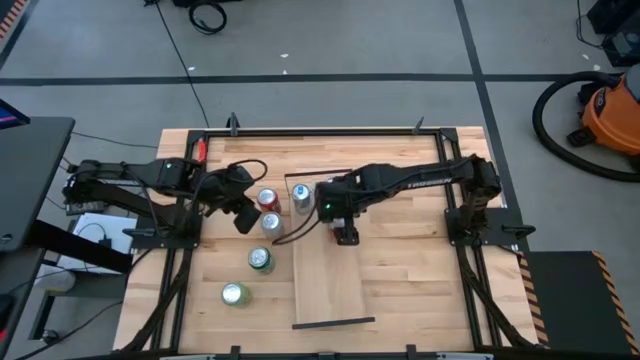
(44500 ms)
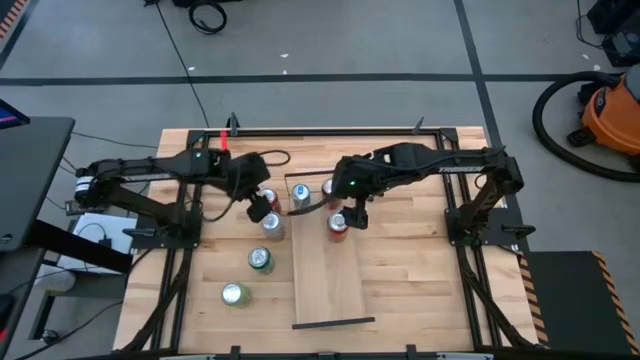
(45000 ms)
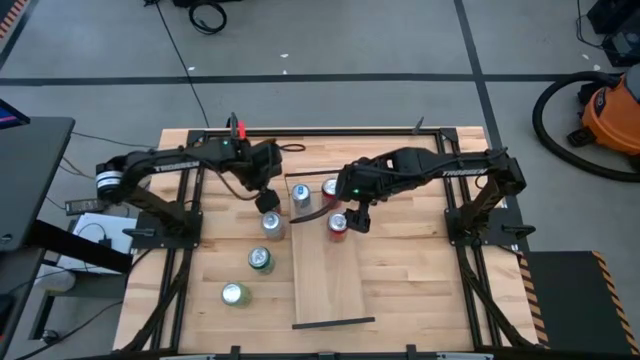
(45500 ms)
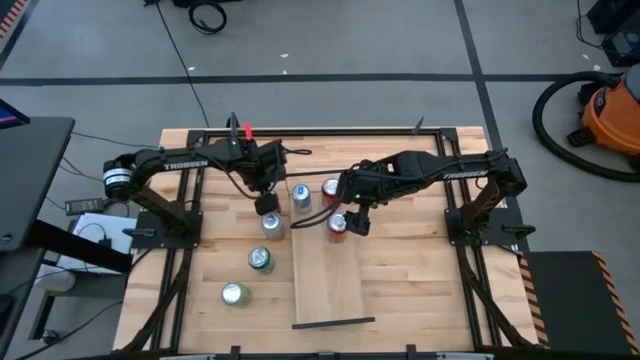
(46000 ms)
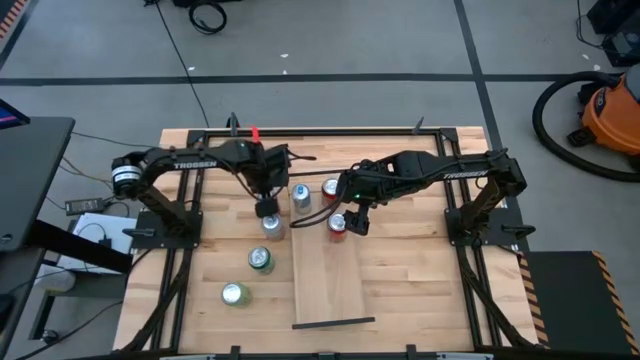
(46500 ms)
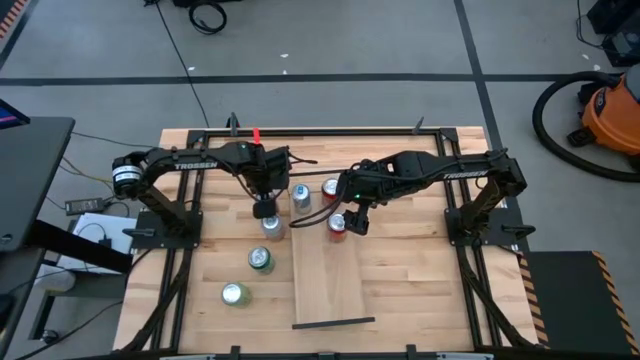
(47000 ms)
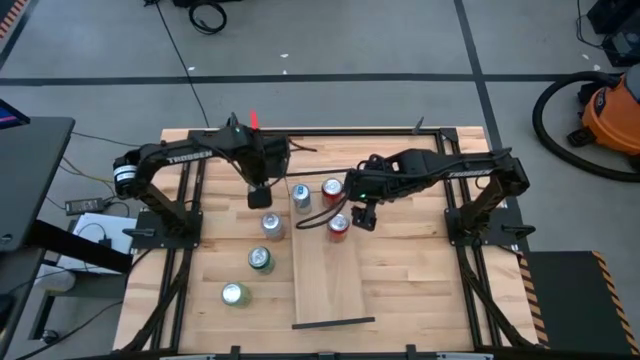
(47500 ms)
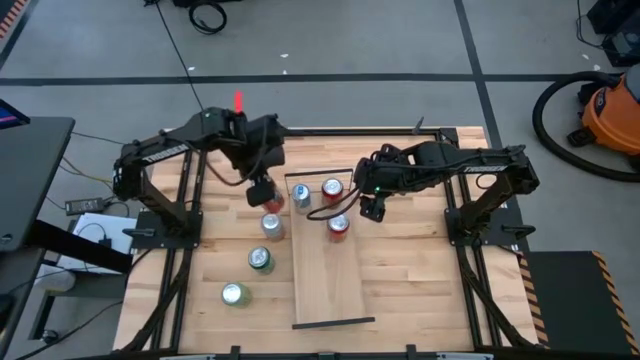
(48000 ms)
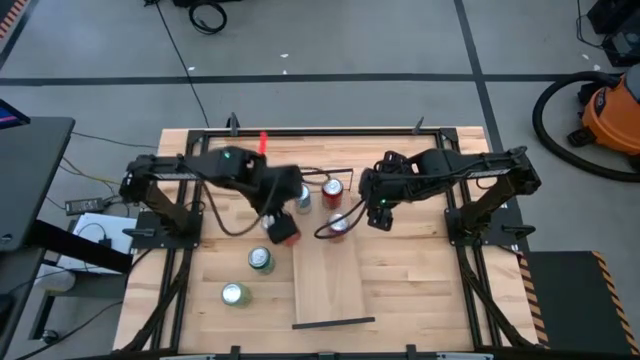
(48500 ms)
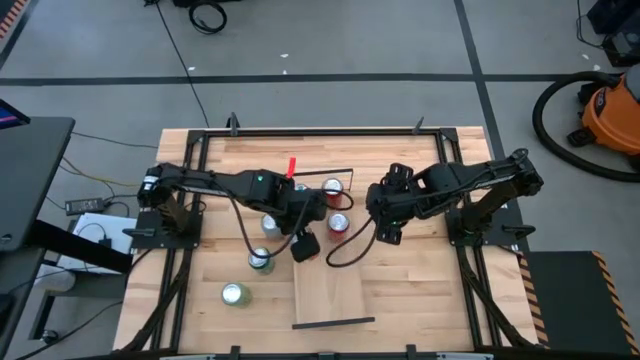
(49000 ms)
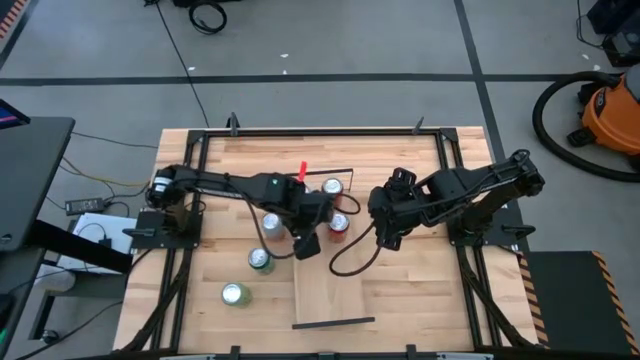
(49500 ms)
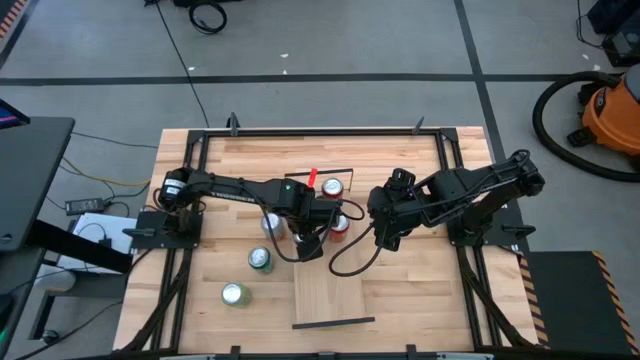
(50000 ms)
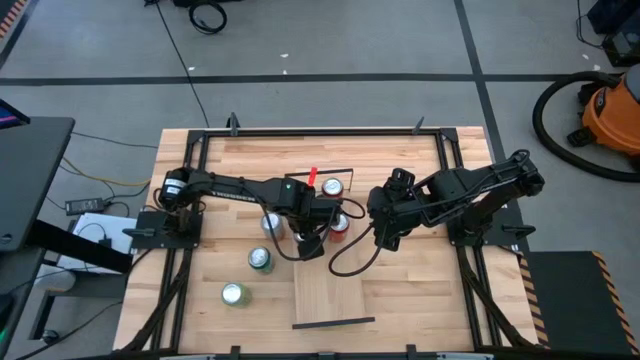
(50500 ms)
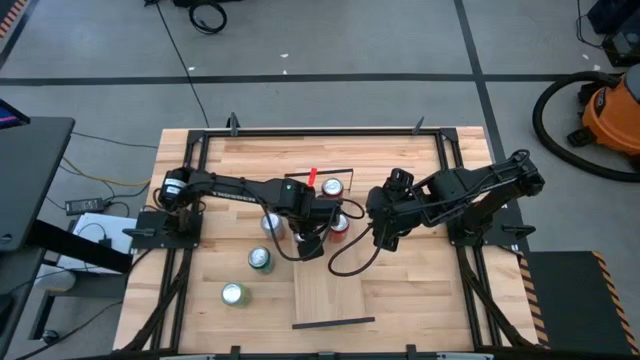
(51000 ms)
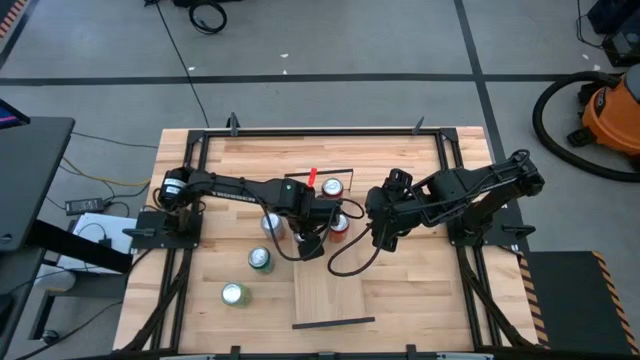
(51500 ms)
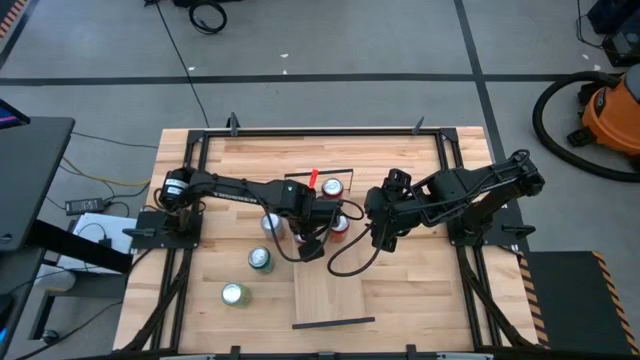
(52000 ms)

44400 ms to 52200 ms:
Task: Place canned beverage on shelf
Put the red soda can on the shelf

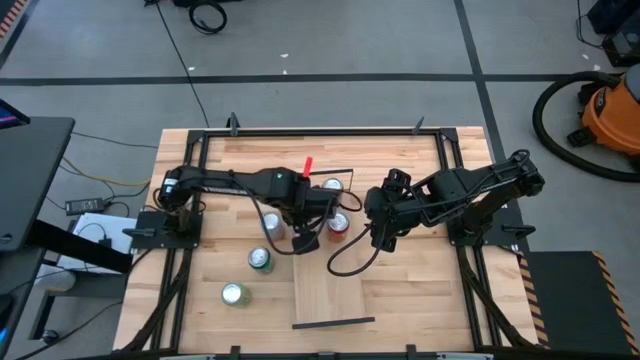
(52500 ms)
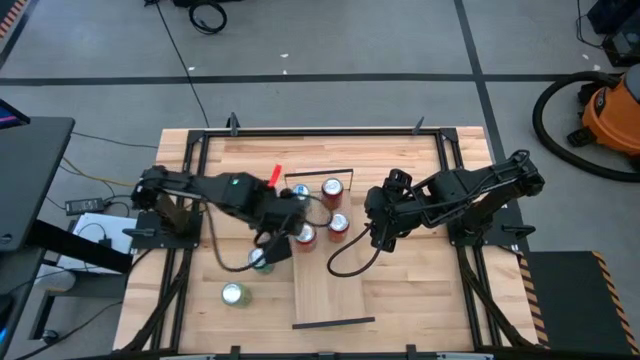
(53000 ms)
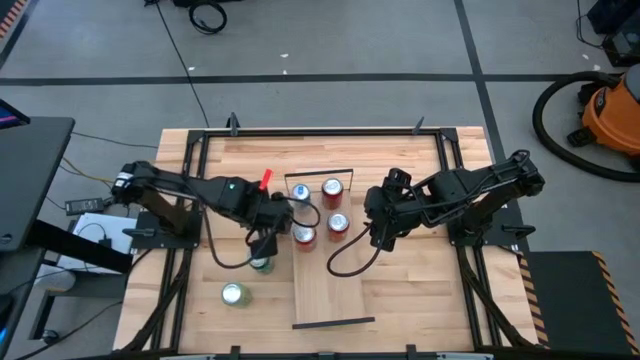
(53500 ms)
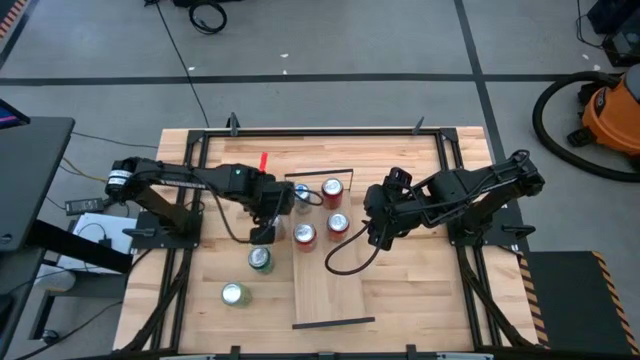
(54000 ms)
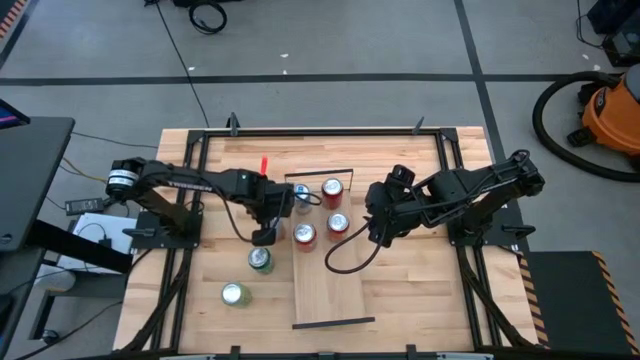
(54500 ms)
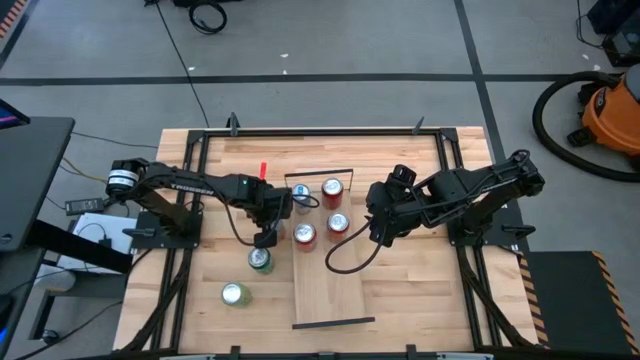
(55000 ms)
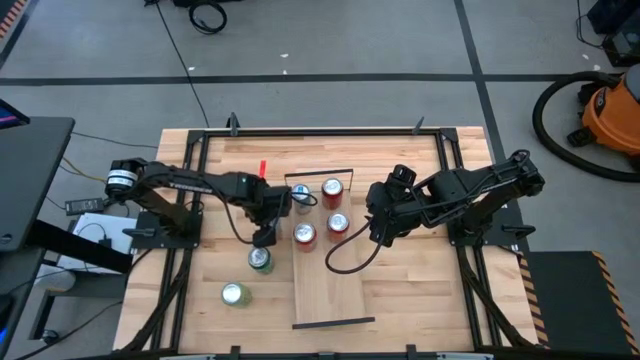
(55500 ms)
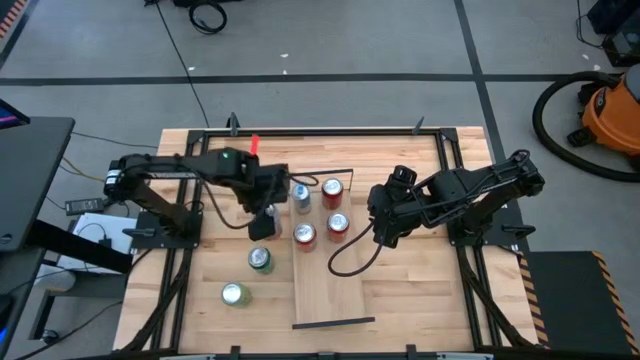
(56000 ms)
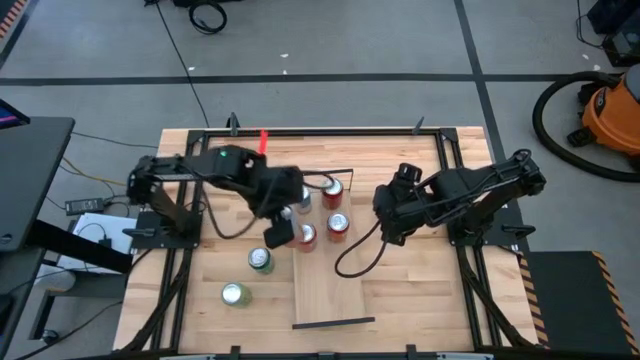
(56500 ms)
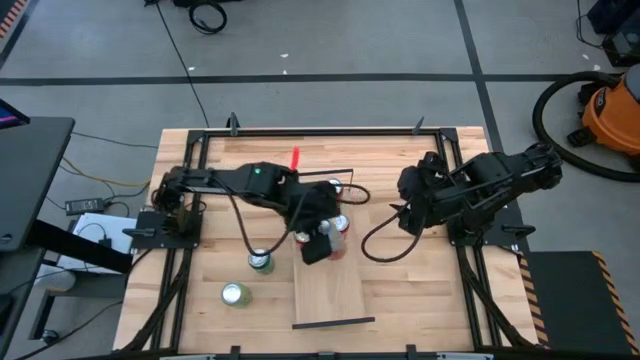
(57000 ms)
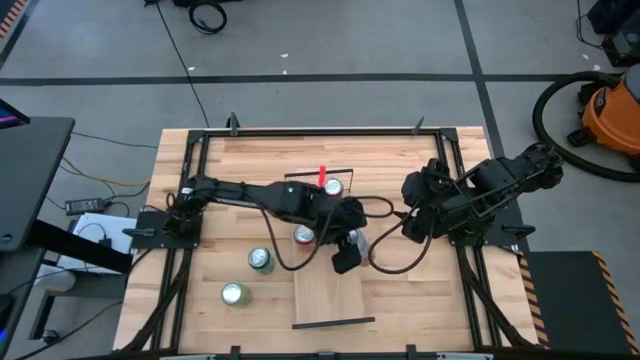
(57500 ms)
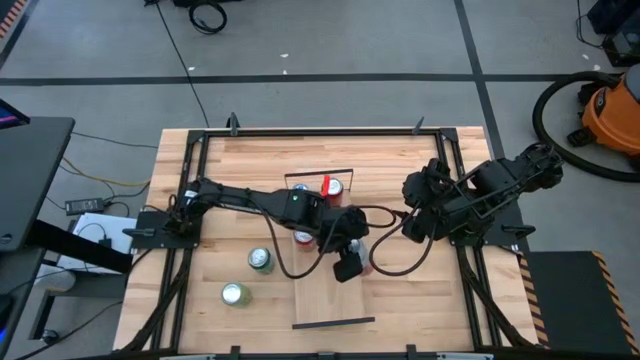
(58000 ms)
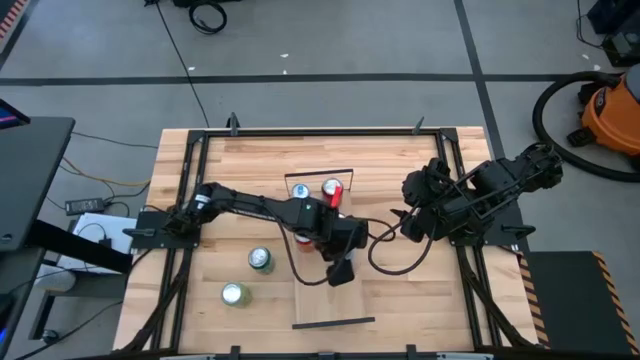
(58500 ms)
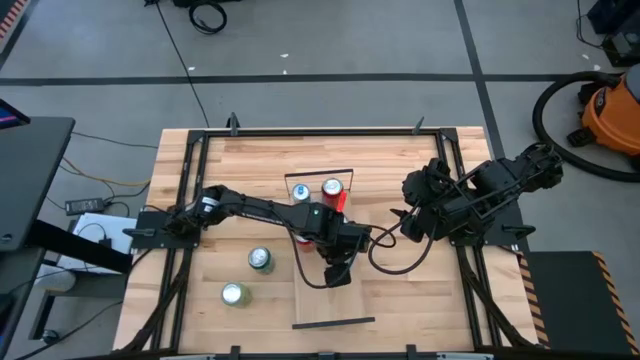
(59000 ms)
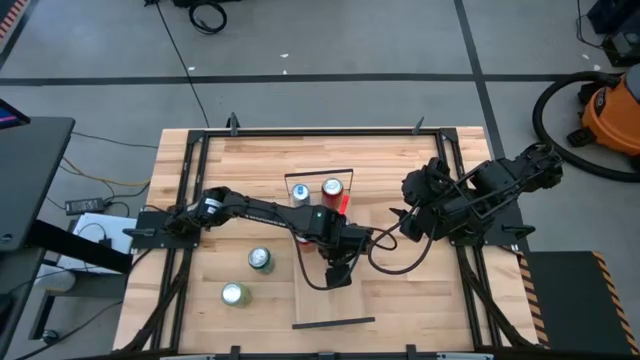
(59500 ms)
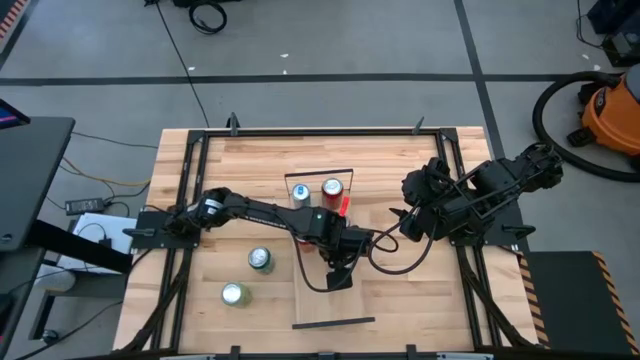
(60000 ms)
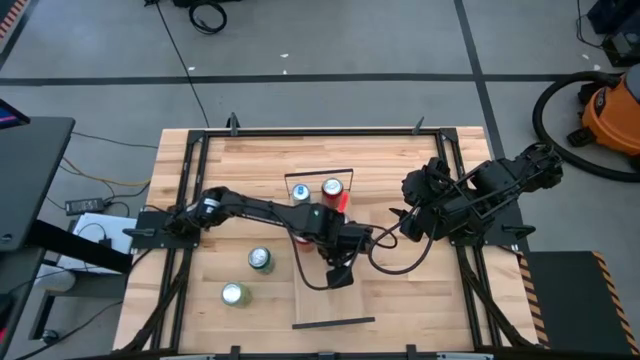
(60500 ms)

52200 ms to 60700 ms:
Put the orange and white soda can on the shelf
